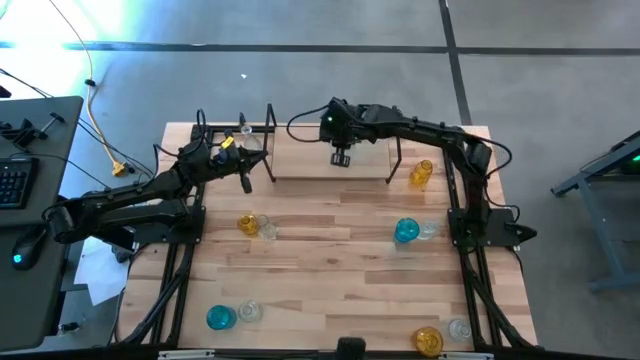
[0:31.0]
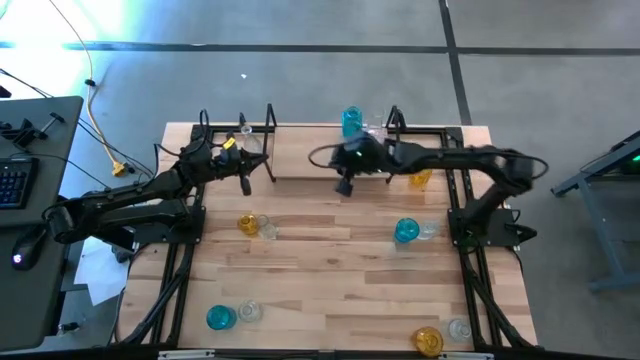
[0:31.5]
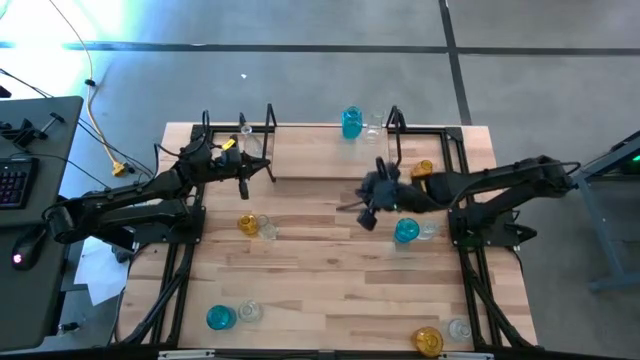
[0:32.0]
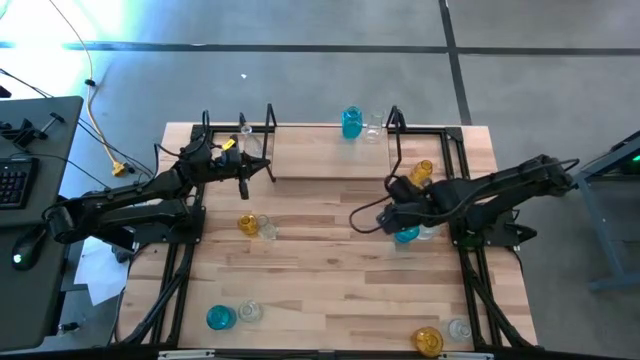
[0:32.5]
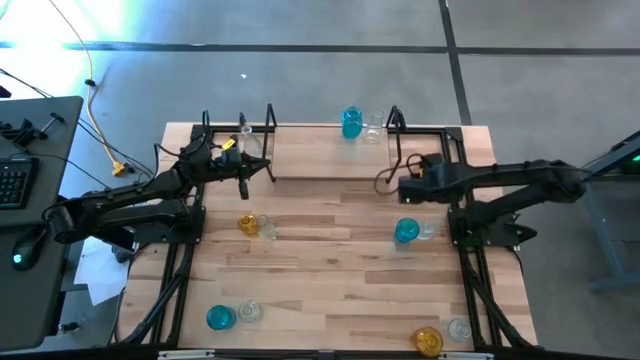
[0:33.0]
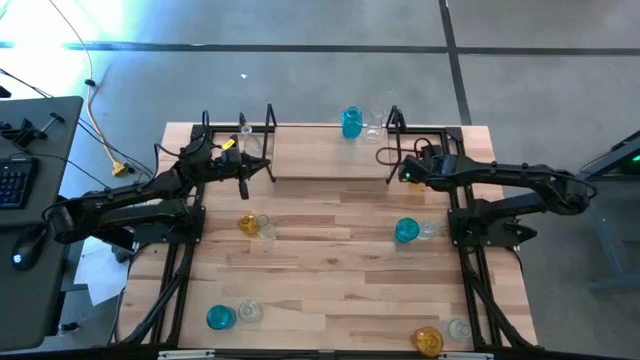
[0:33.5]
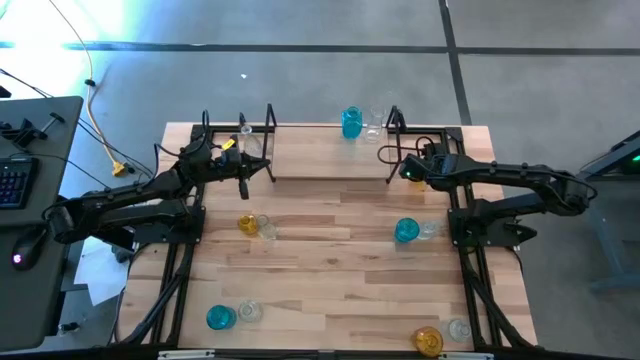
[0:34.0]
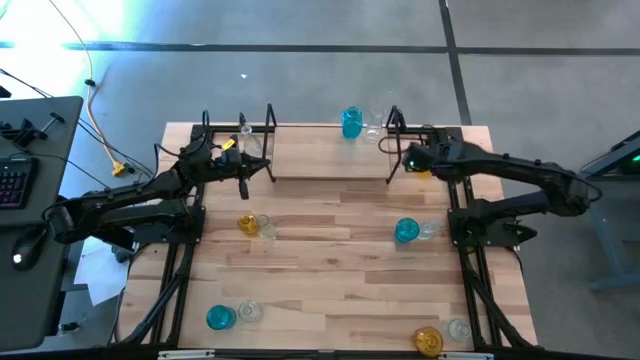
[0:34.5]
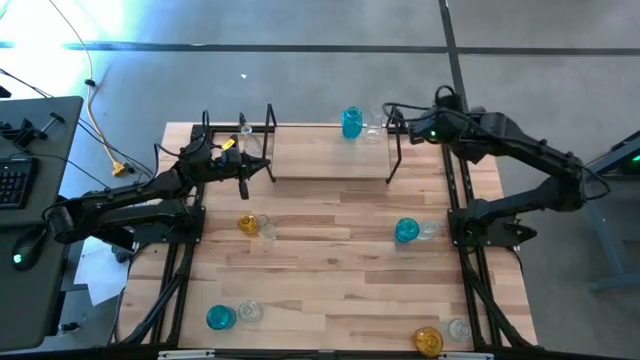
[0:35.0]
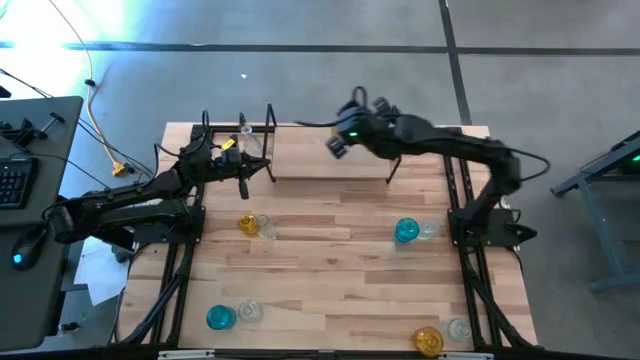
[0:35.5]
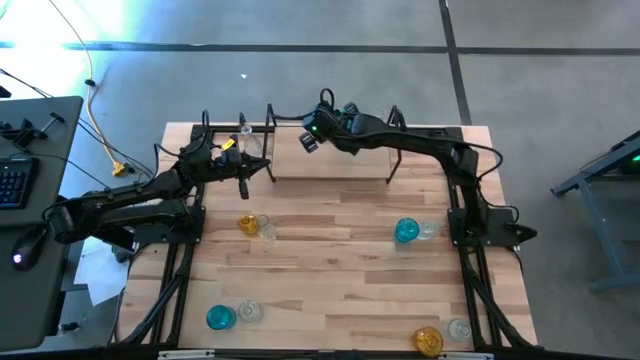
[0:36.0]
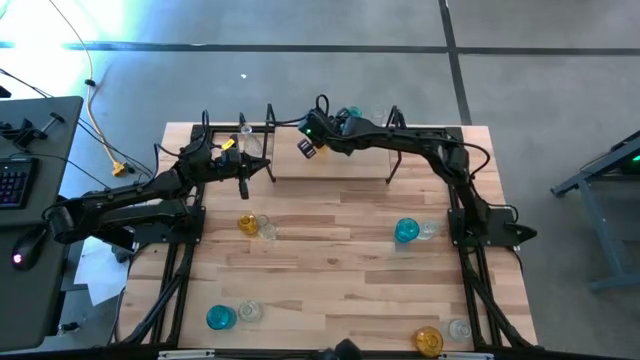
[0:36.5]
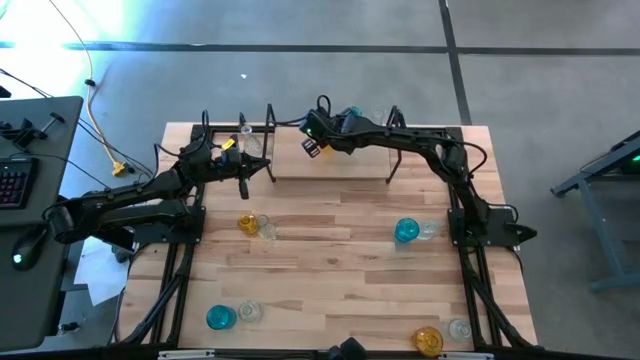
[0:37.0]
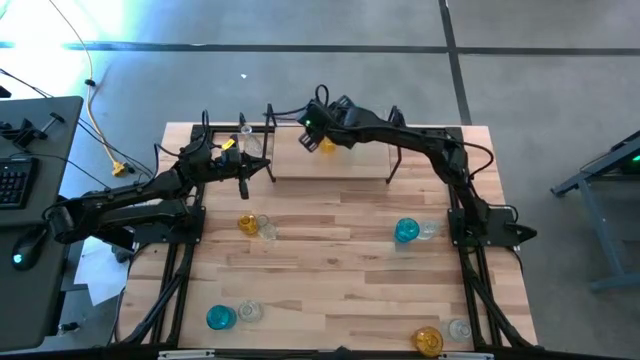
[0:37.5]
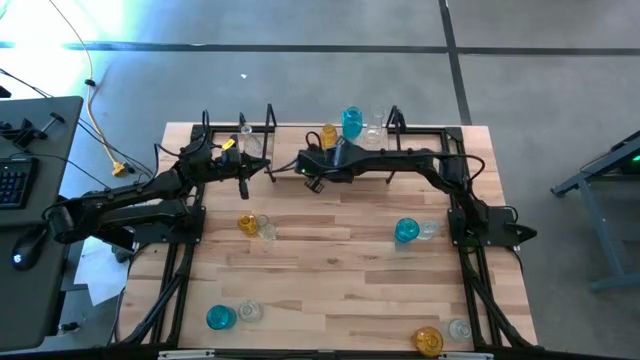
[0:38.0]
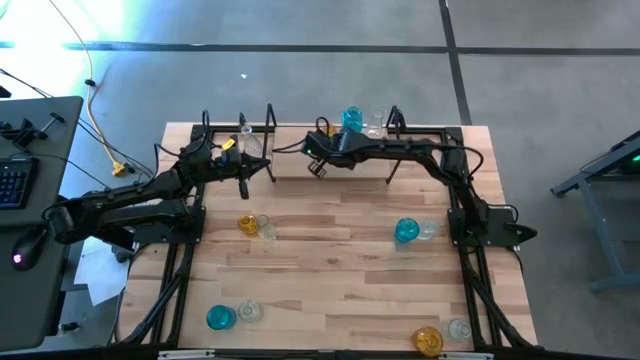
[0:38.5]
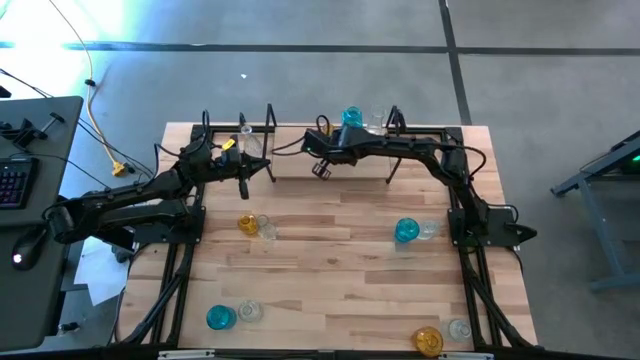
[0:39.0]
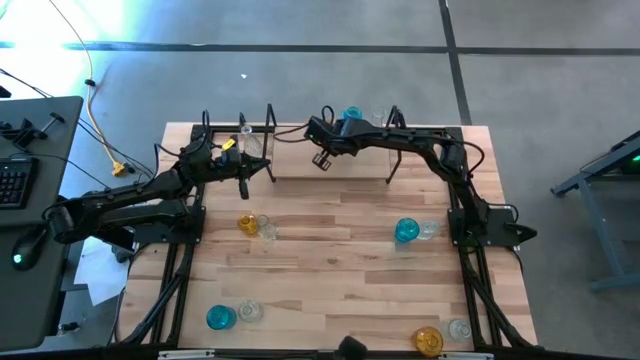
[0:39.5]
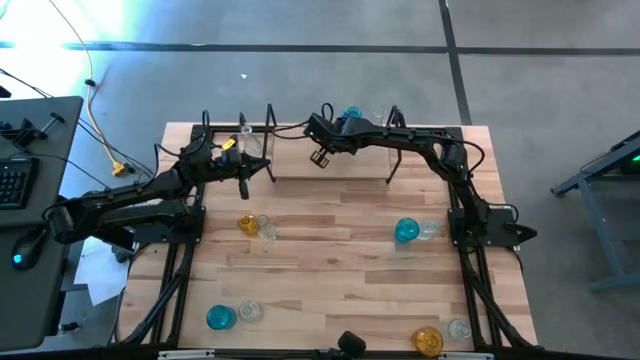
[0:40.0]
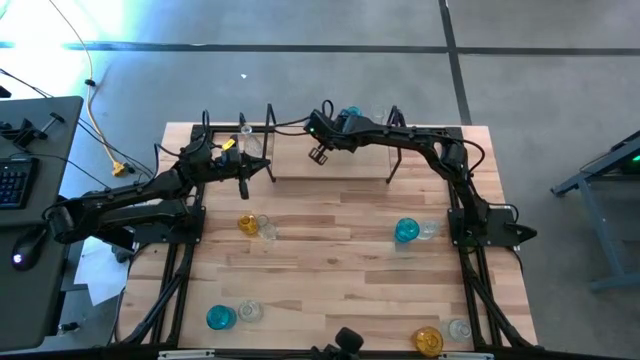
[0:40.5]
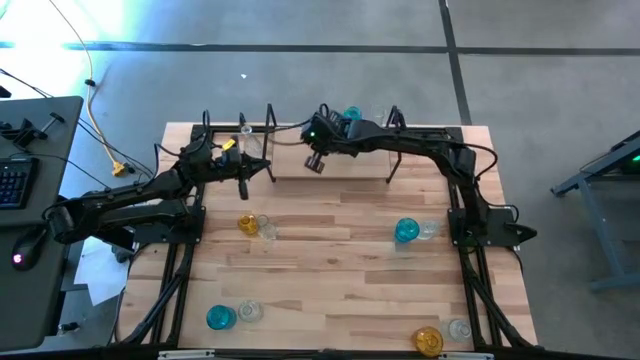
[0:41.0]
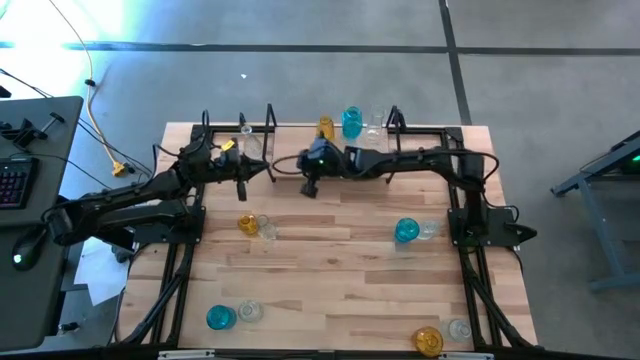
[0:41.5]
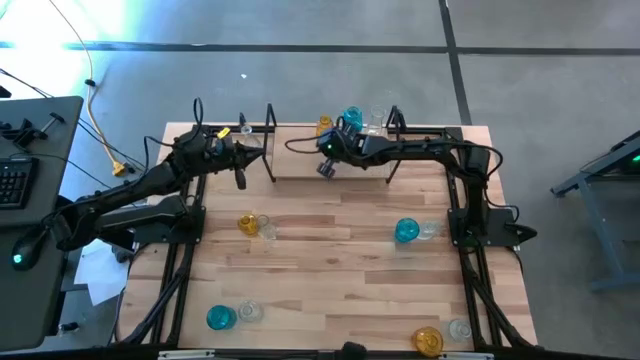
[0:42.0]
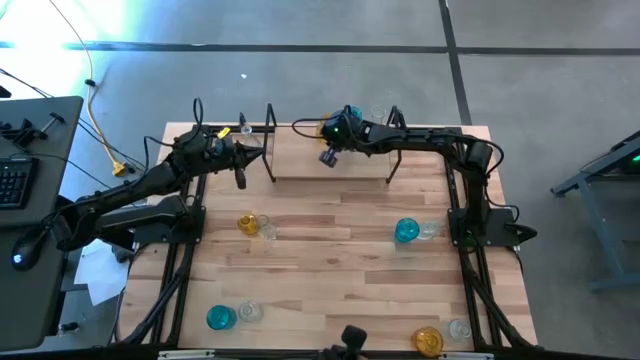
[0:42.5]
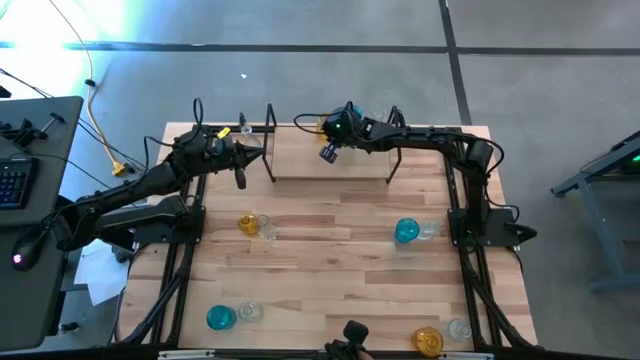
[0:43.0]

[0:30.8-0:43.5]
Task: sort vases onto shelf
Put the yellow vase on the shelf

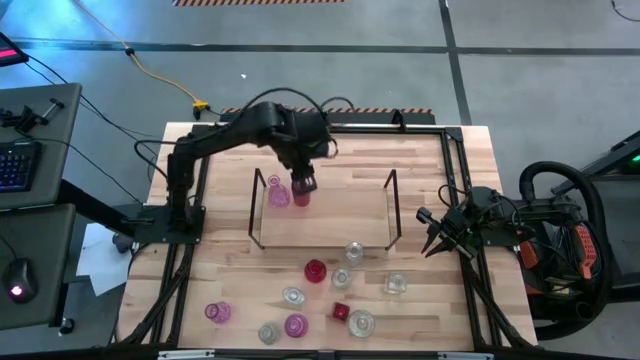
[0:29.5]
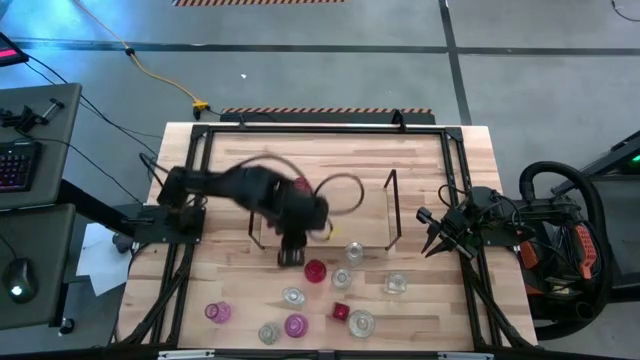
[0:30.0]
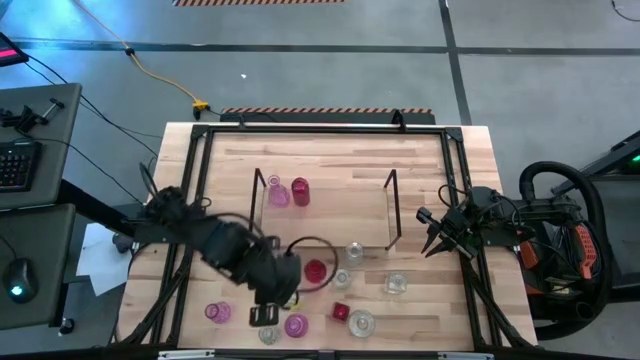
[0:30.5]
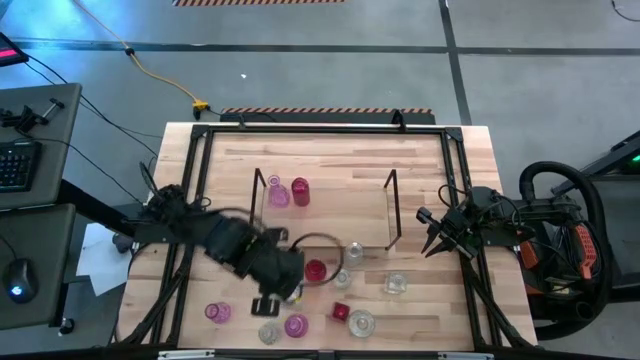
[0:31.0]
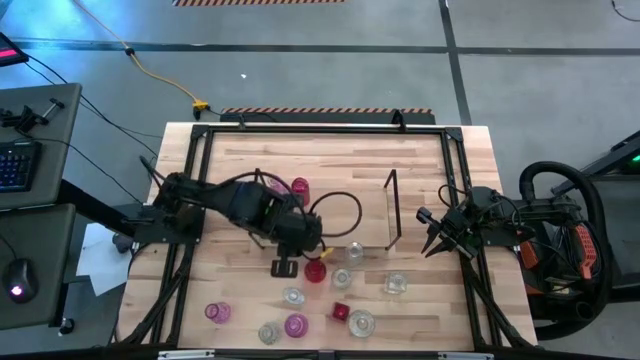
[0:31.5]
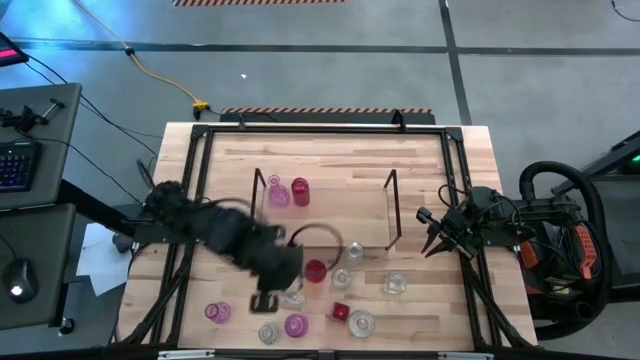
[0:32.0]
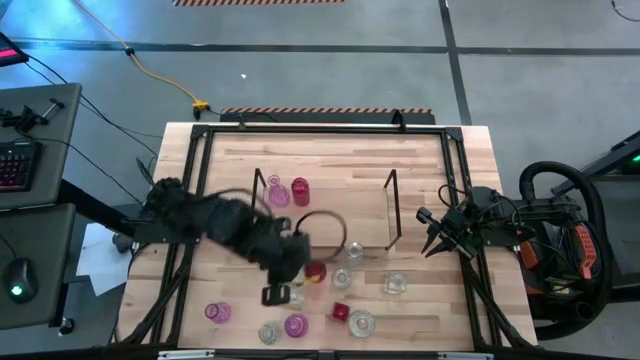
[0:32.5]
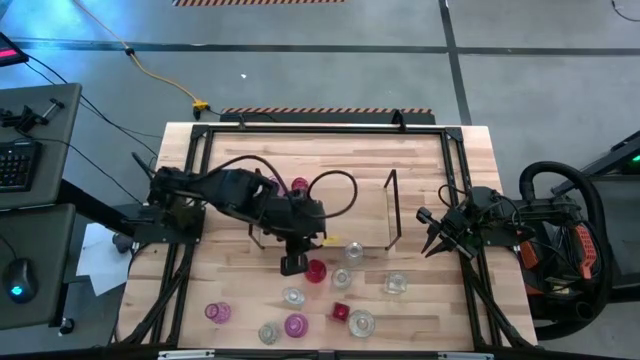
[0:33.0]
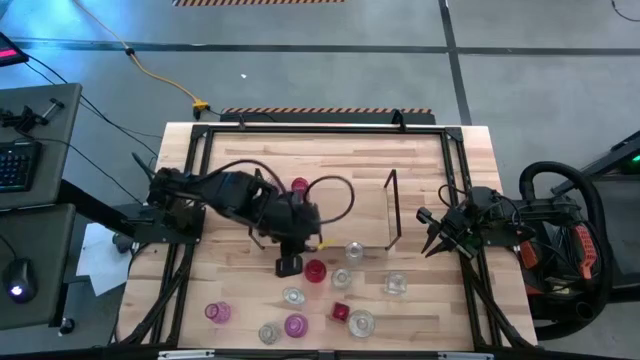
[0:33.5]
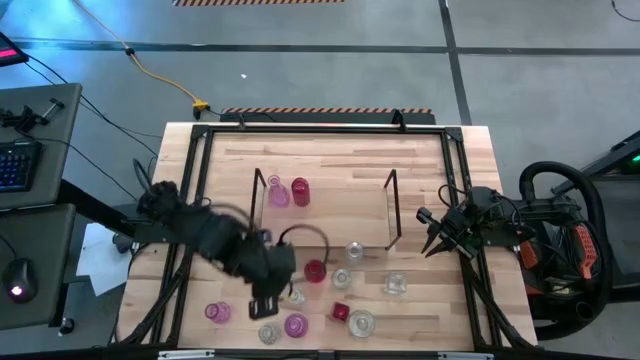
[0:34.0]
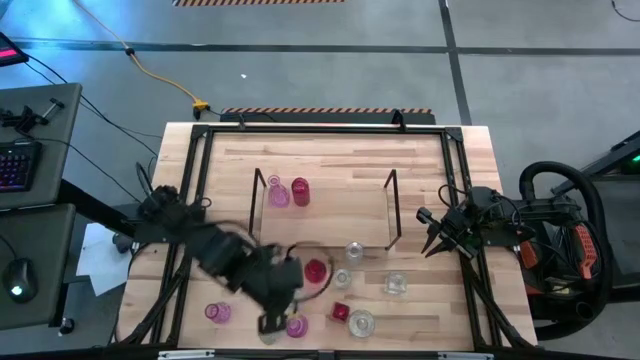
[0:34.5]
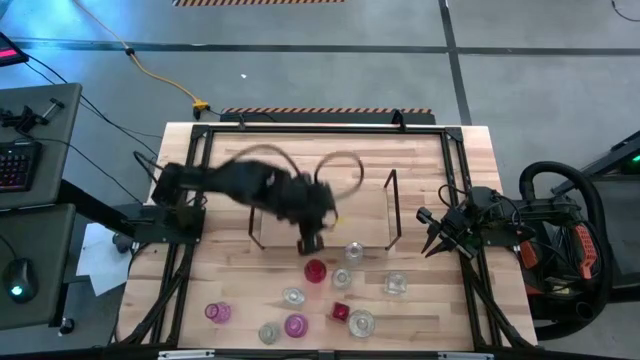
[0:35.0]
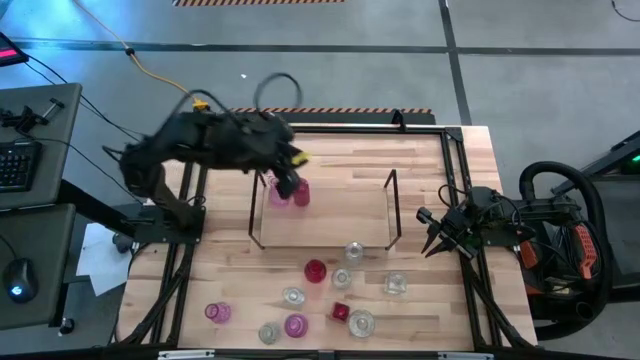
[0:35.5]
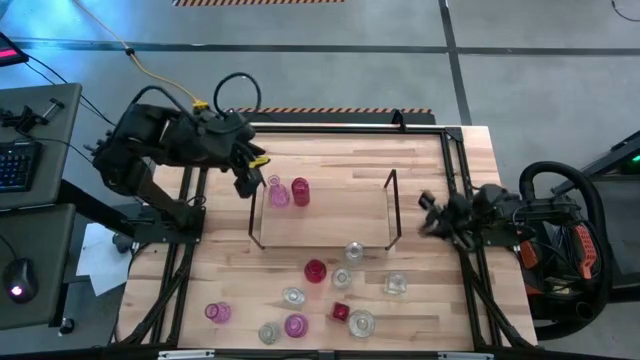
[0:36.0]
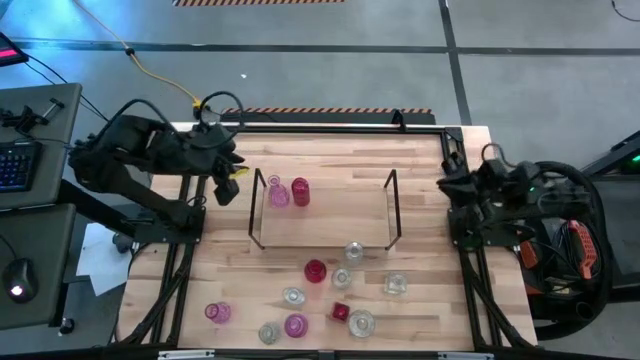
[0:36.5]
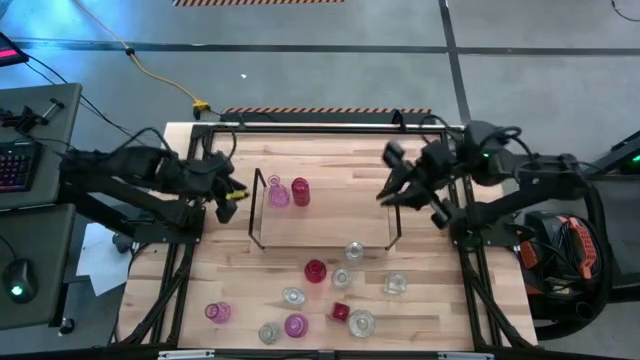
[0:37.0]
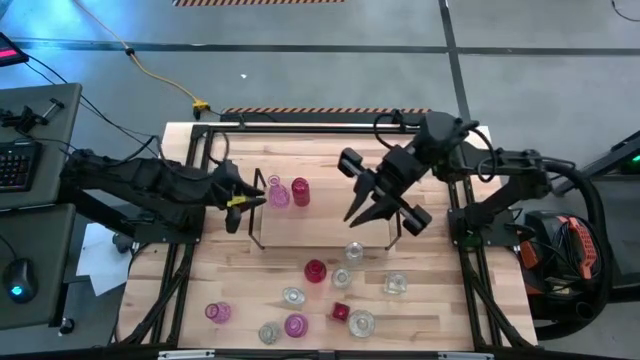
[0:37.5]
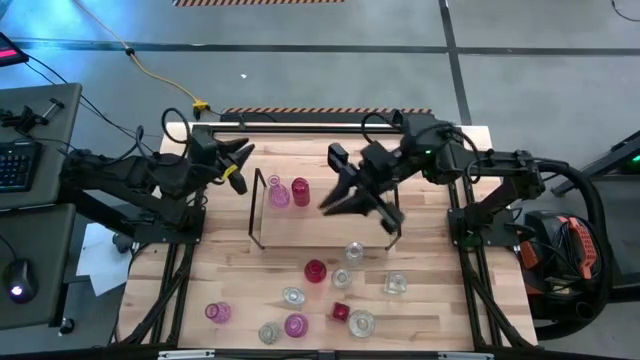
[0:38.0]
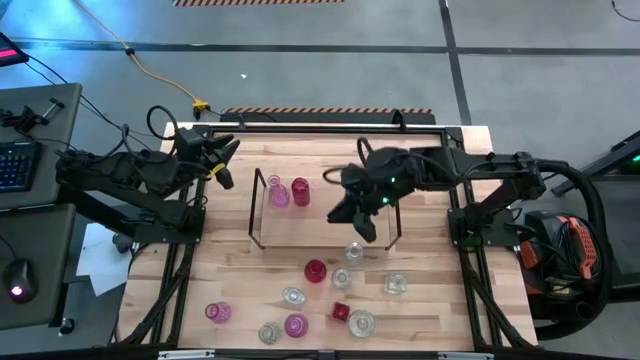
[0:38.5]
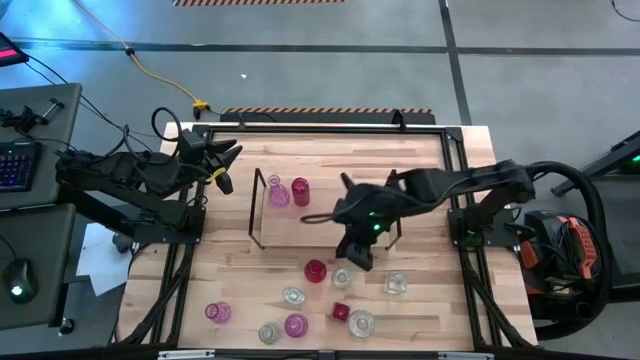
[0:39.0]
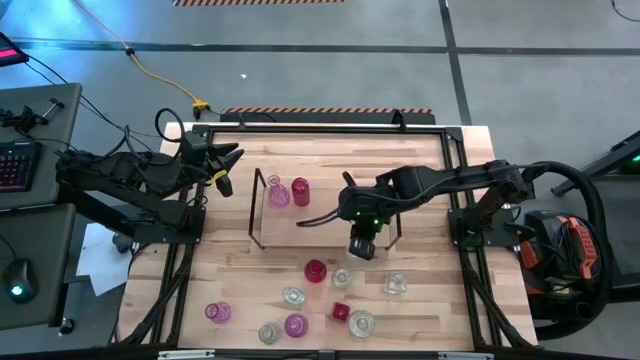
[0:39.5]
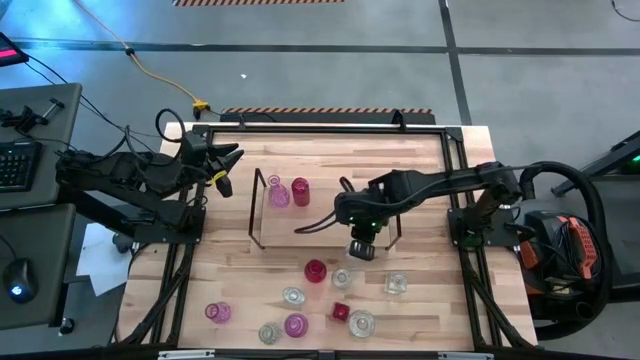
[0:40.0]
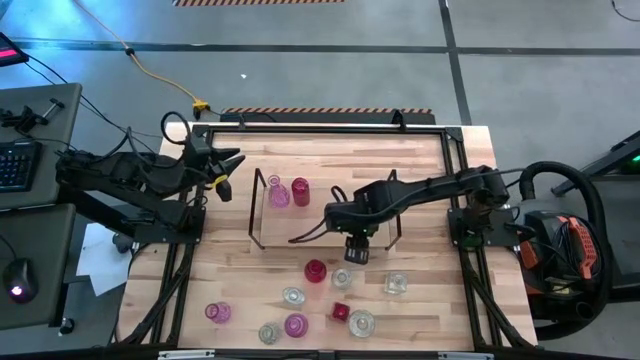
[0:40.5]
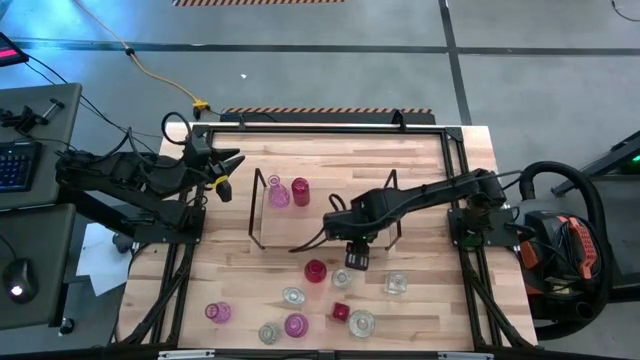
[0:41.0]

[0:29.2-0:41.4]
Task: sort vases onto shelf
Put the transparent vase on the shelf
